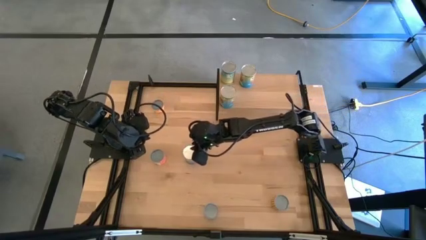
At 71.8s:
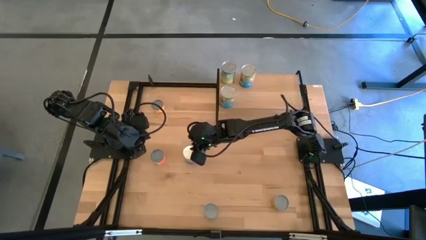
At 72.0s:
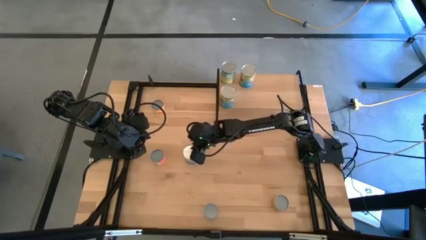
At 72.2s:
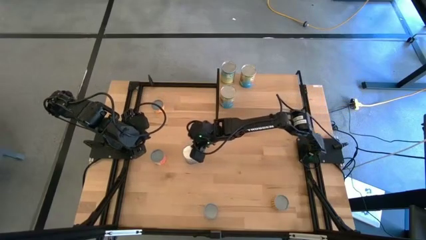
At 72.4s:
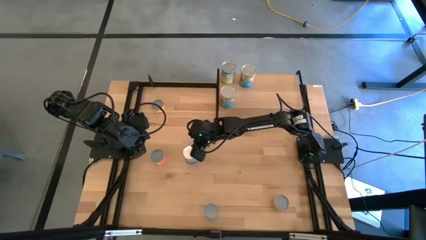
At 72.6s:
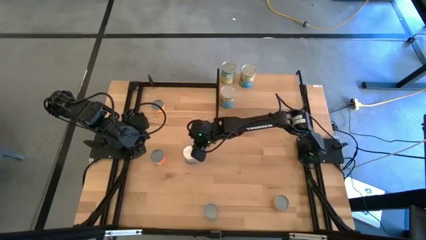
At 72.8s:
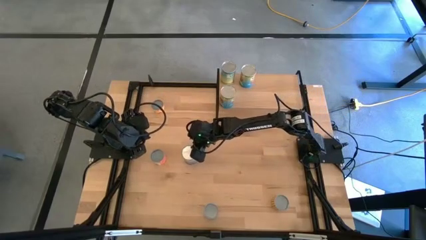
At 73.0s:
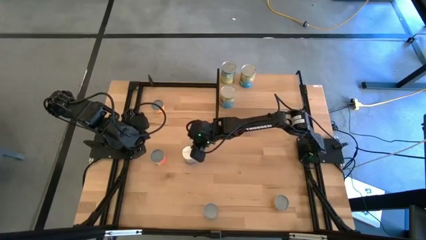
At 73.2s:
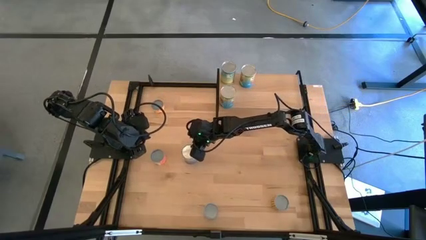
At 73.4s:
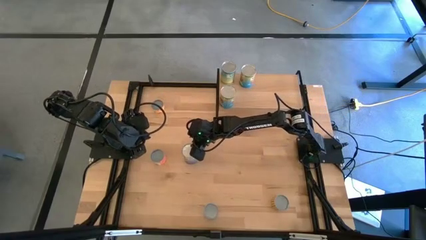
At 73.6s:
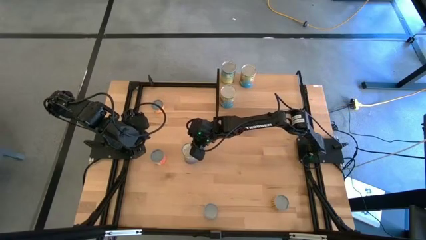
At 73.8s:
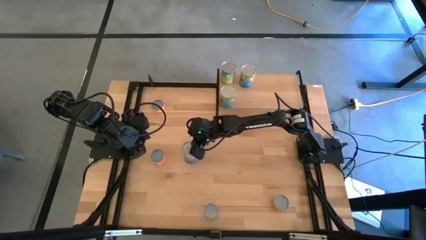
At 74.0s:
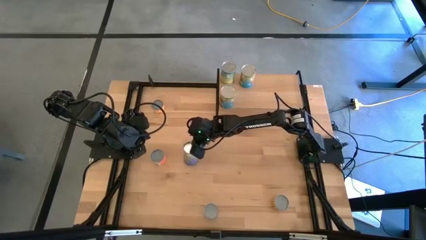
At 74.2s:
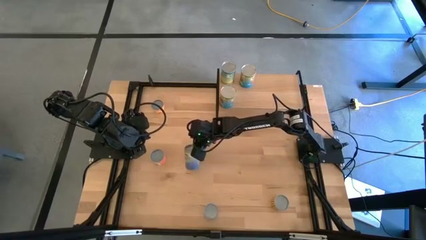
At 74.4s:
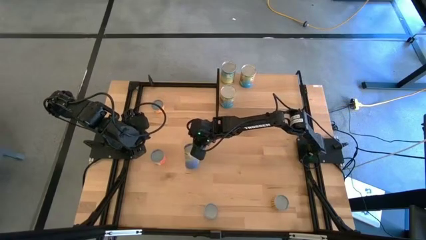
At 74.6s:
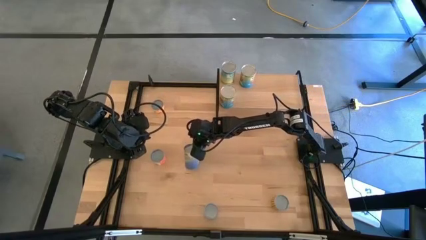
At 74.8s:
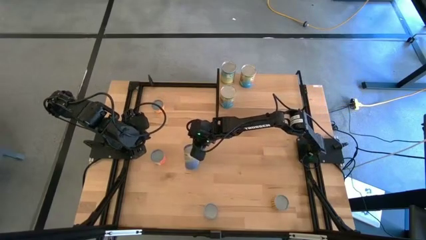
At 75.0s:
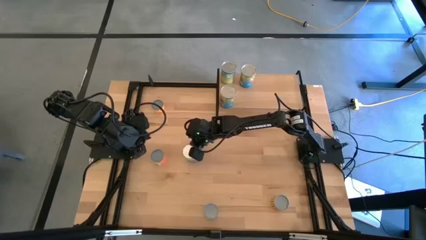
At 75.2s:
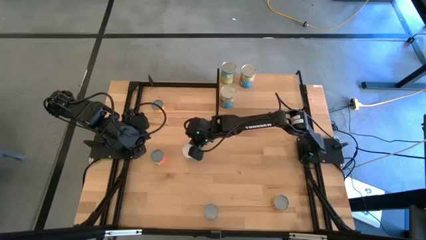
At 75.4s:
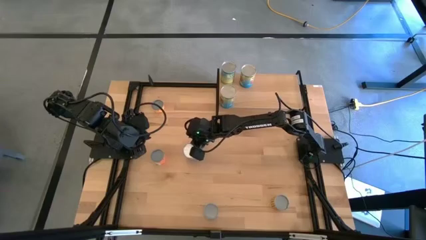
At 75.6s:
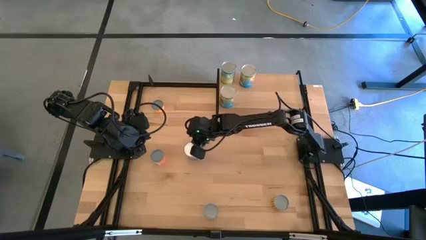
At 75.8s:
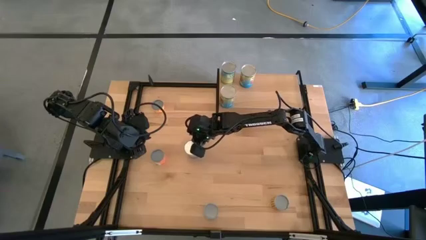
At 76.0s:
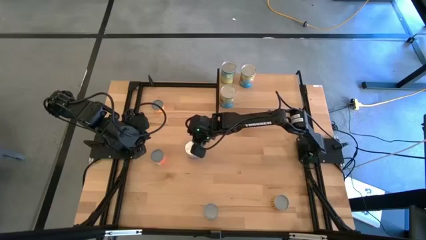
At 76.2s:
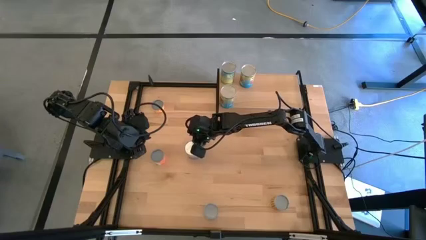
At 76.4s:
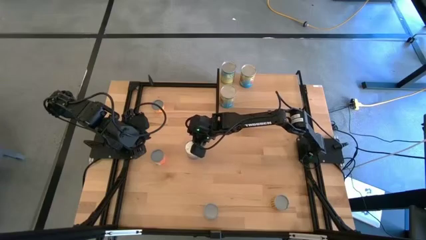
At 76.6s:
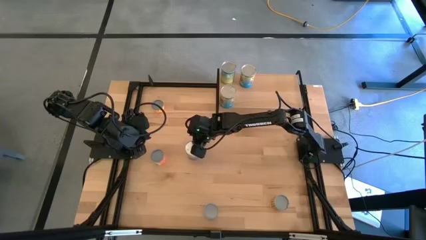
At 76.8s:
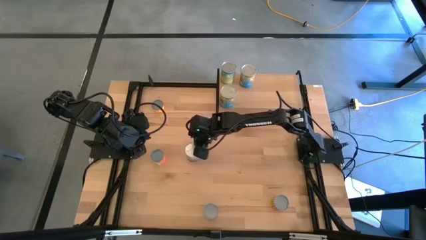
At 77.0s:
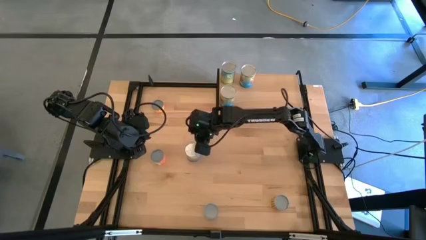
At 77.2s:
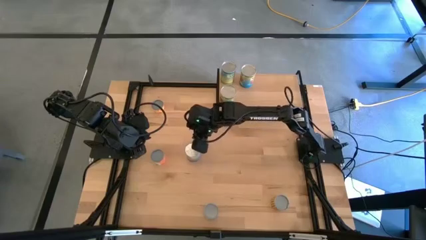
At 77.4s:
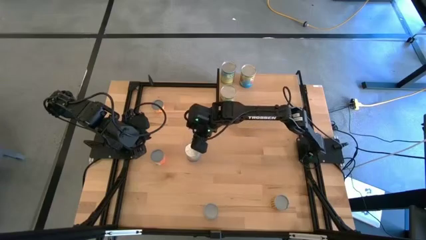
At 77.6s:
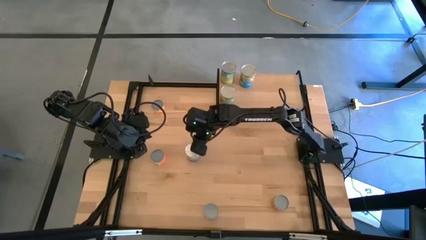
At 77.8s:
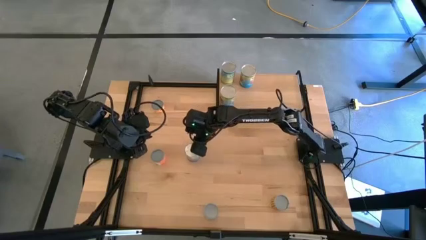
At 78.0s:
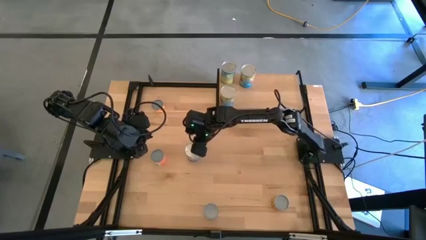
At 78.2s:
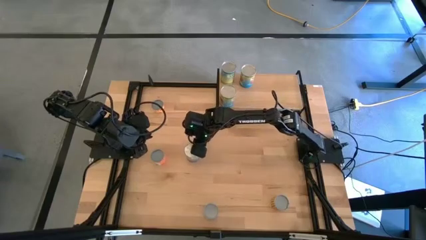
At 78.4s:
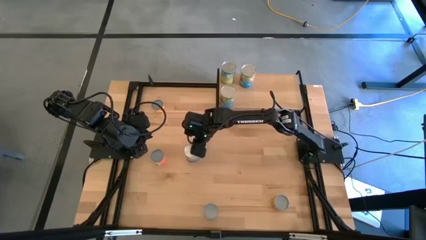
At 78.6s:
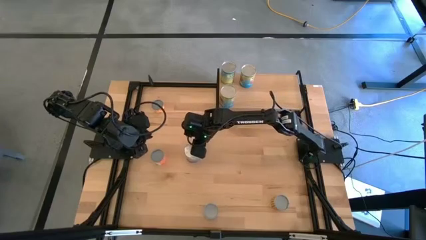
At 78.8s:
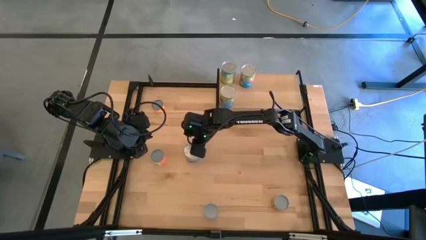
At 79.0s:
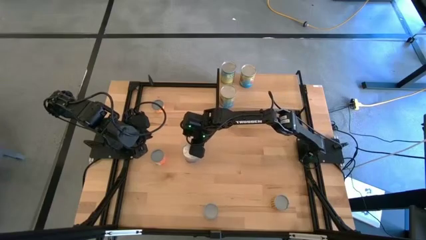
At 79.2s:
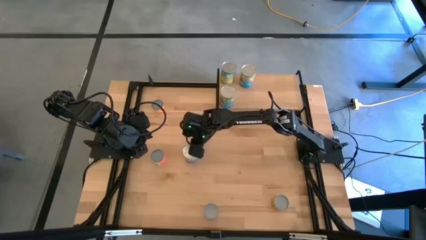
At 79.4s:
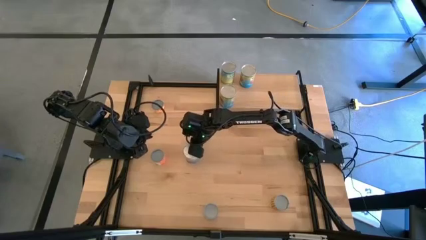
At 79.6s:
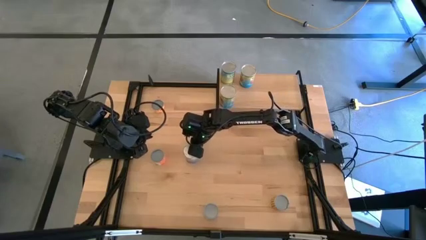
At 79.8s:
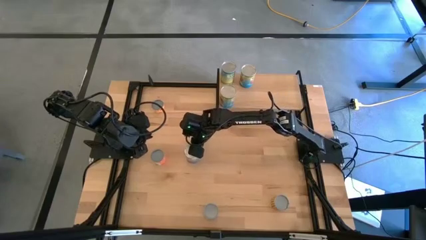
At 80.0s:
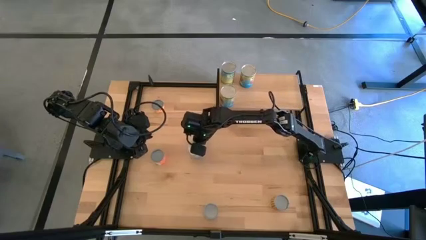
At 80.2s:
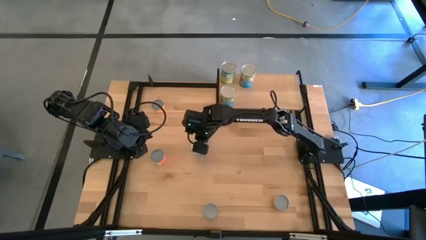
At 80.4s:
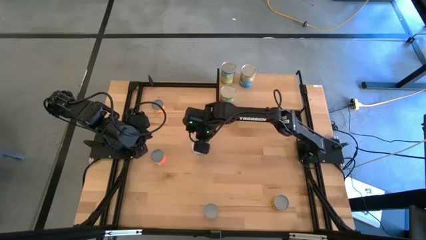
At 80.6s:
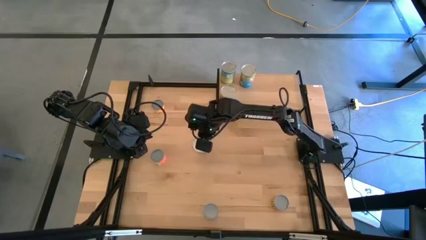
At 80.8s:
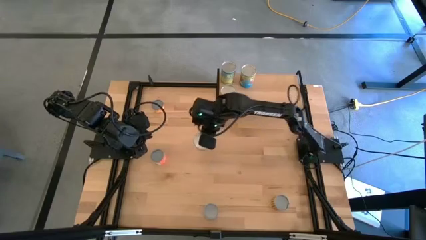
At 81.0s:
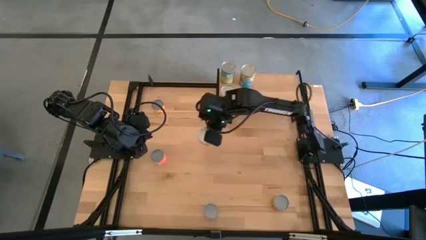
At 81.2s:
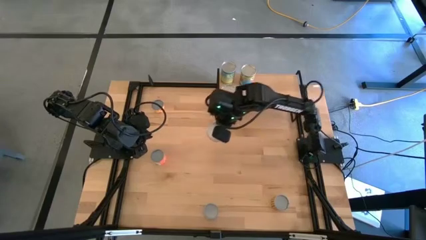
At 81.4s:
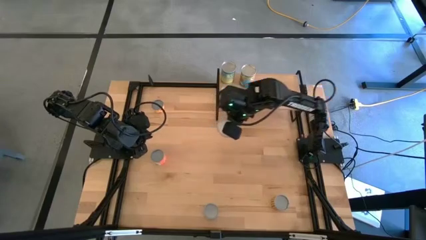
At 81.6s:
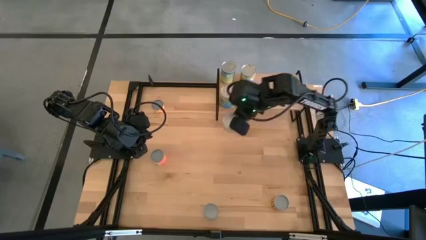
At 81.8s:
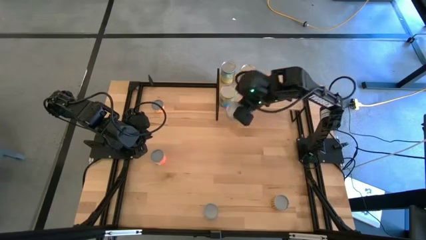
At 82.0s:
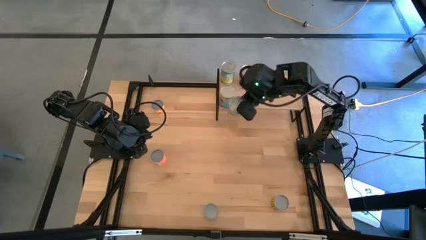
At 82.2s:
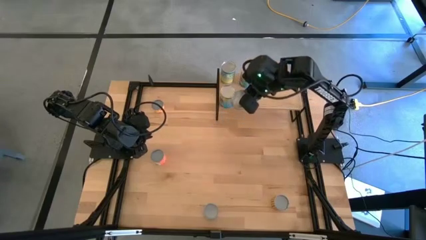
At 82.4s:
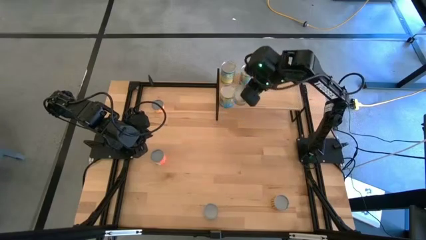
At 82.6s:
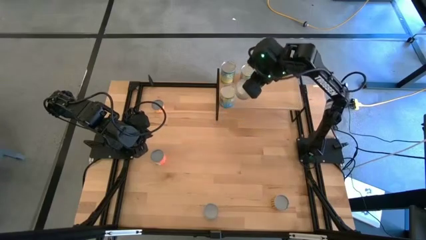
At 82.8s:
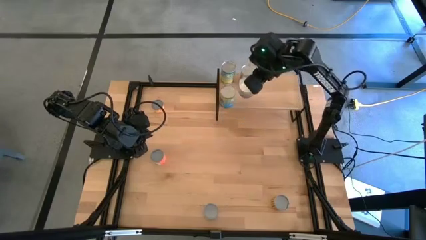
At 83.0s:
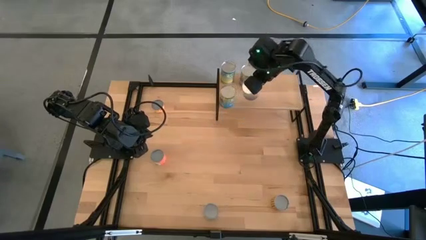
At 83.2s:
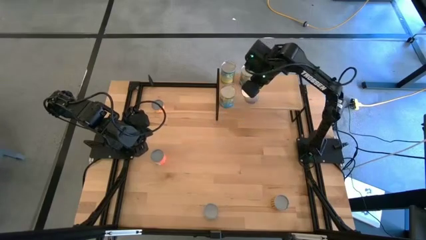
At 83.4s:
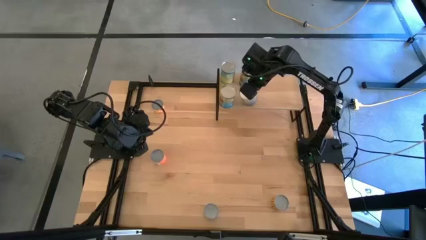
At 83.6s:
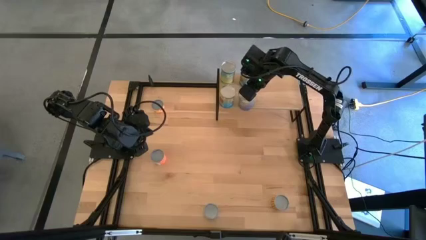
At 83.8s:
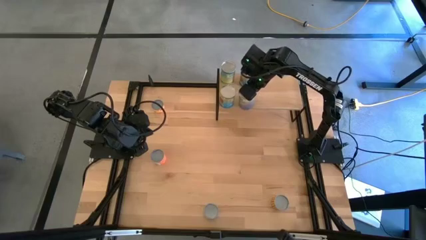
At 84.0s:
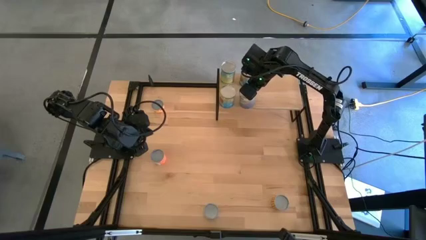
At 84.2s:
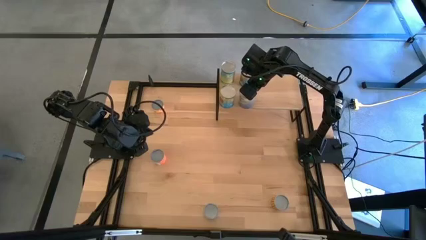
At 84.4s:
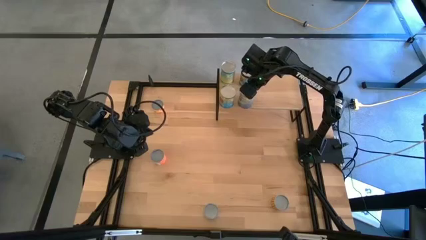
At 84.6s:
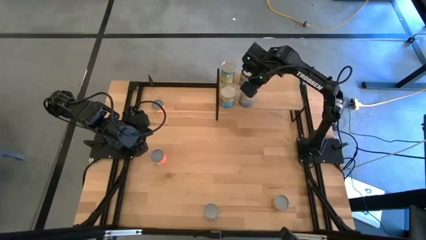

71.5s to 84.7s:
Task: Pick and place cans onto a shelf
Put the canned peas on the shelf
